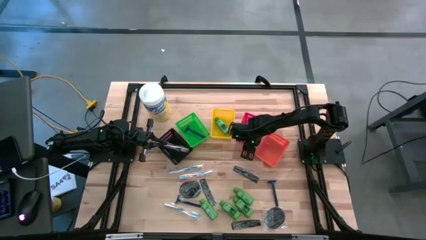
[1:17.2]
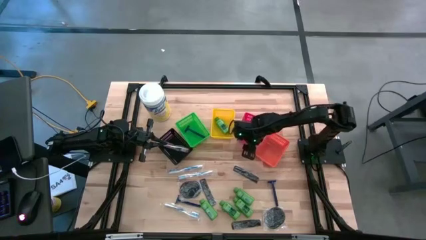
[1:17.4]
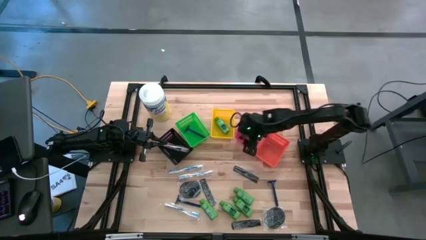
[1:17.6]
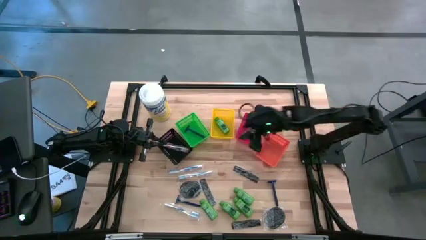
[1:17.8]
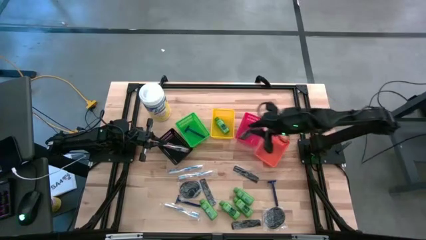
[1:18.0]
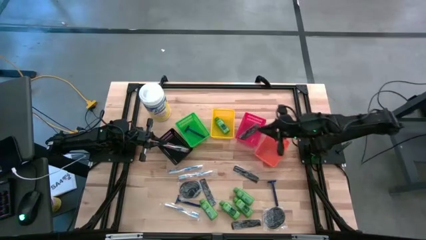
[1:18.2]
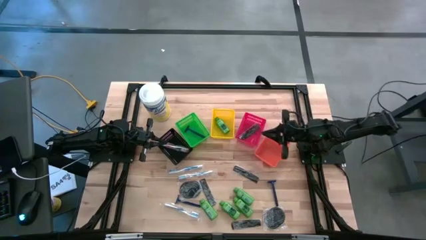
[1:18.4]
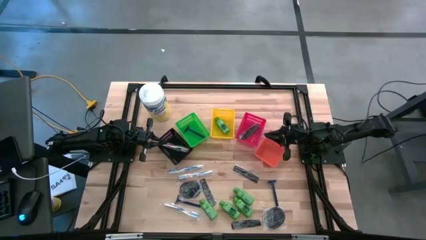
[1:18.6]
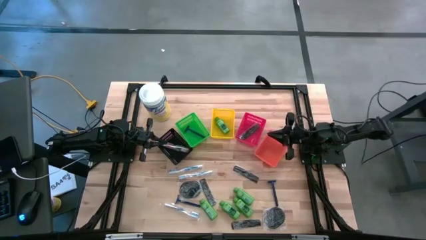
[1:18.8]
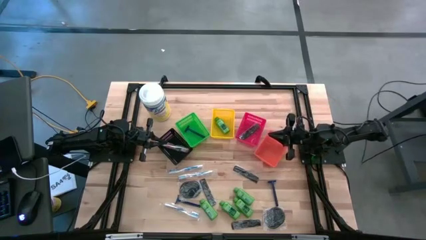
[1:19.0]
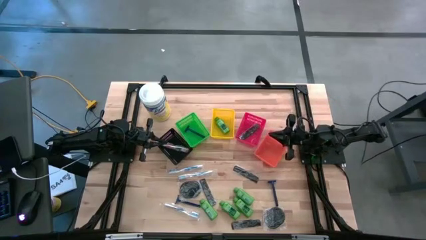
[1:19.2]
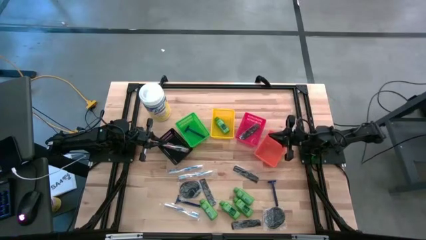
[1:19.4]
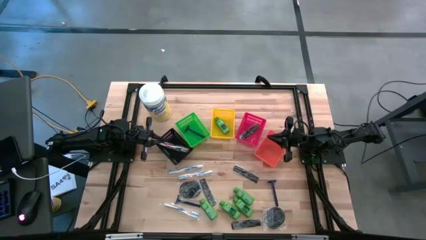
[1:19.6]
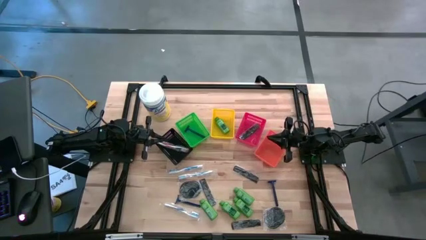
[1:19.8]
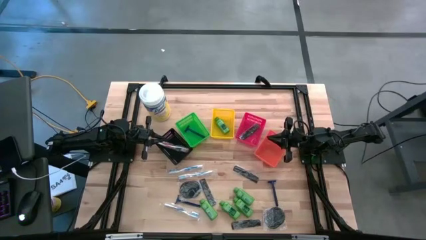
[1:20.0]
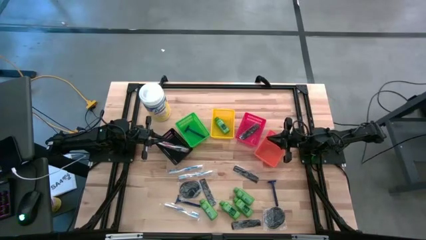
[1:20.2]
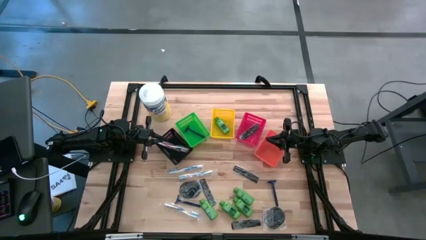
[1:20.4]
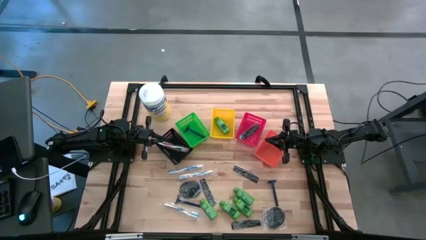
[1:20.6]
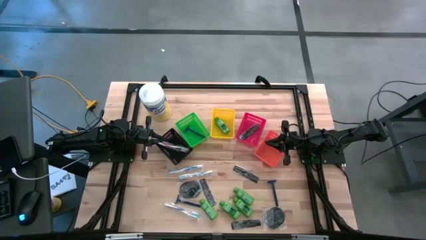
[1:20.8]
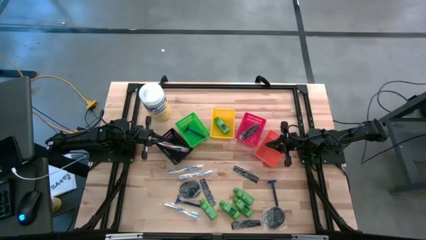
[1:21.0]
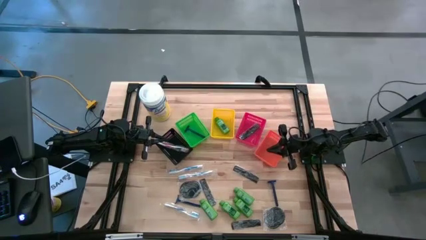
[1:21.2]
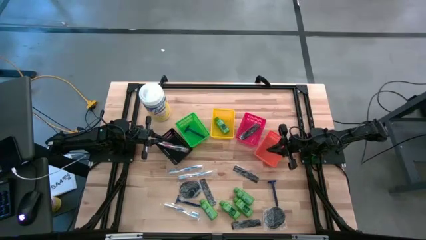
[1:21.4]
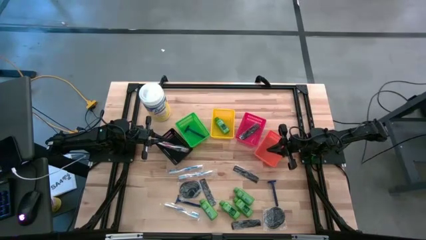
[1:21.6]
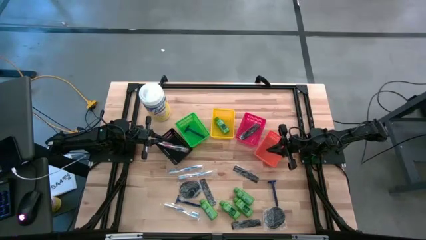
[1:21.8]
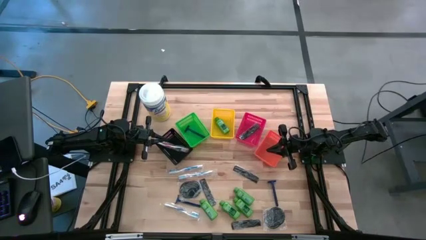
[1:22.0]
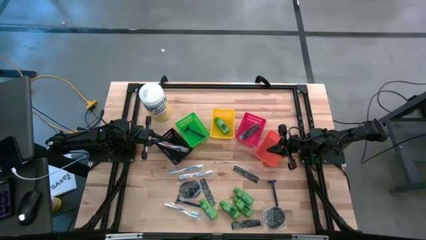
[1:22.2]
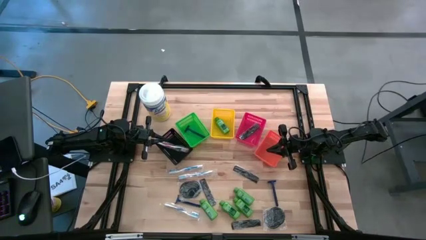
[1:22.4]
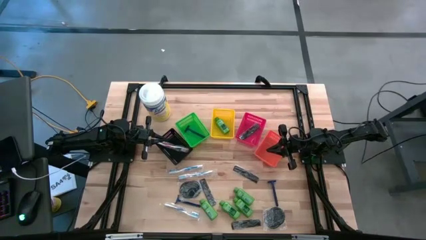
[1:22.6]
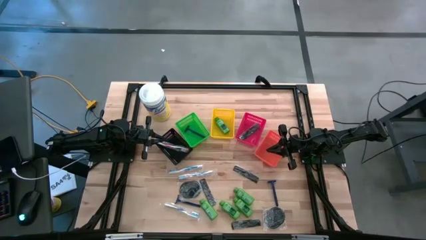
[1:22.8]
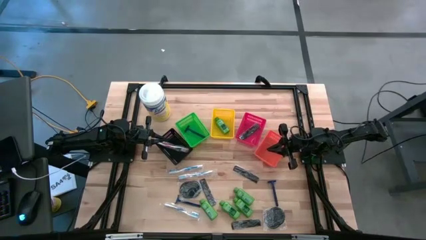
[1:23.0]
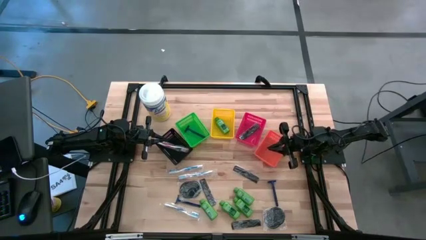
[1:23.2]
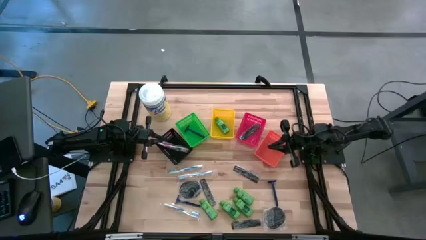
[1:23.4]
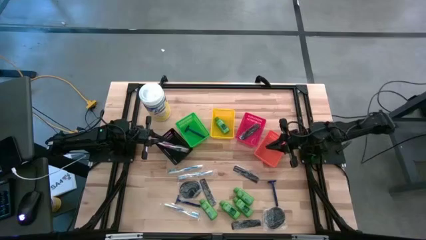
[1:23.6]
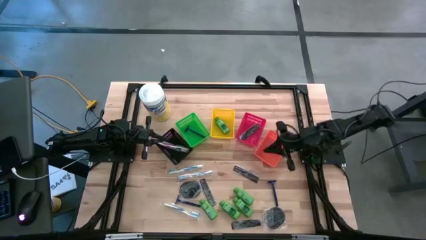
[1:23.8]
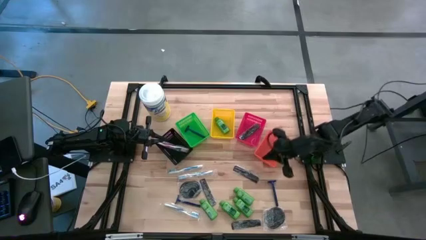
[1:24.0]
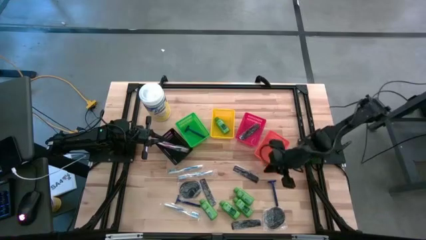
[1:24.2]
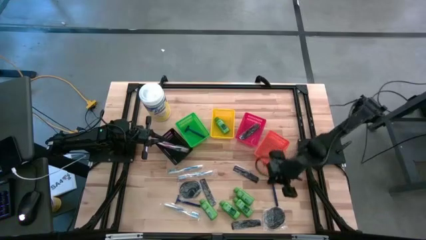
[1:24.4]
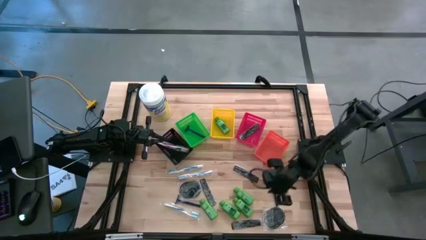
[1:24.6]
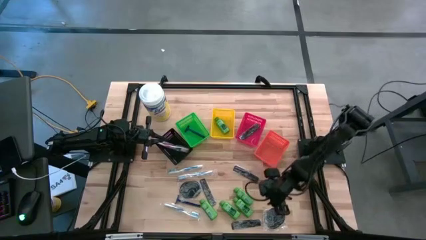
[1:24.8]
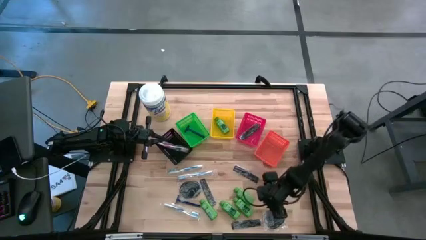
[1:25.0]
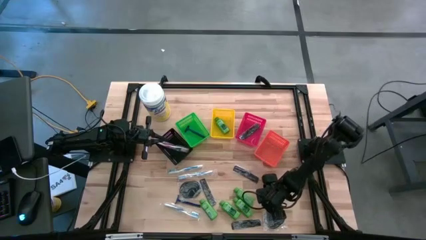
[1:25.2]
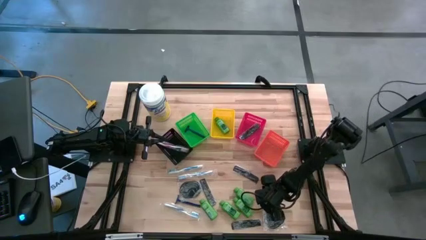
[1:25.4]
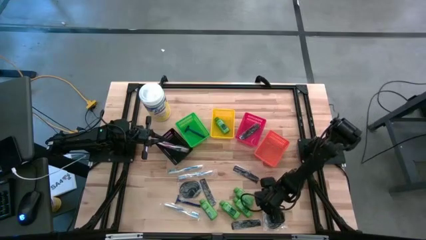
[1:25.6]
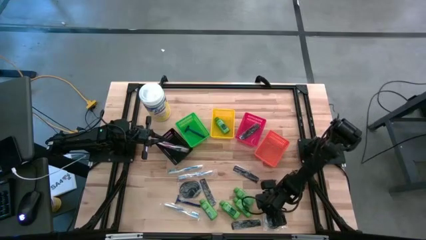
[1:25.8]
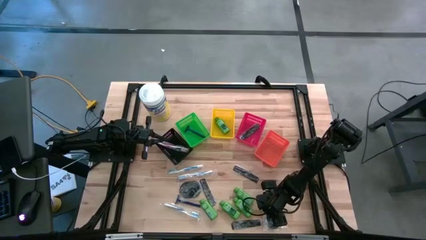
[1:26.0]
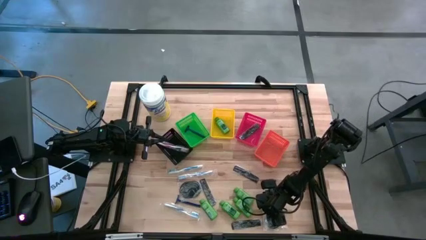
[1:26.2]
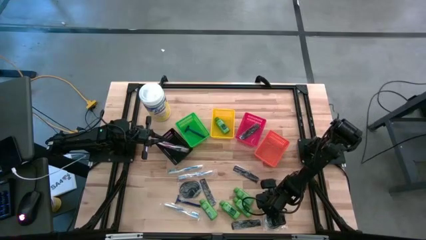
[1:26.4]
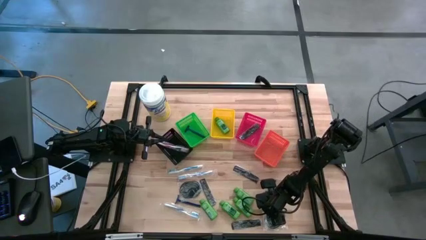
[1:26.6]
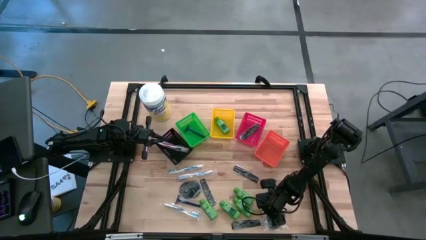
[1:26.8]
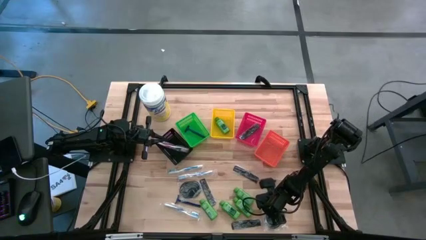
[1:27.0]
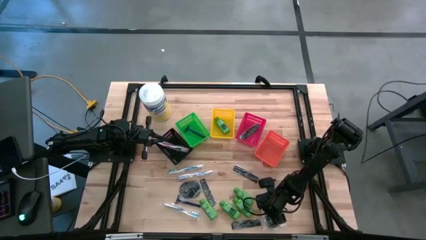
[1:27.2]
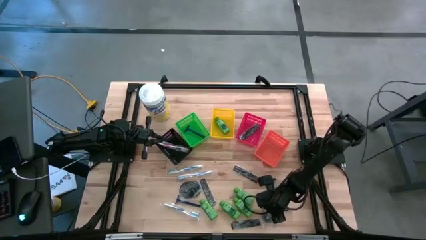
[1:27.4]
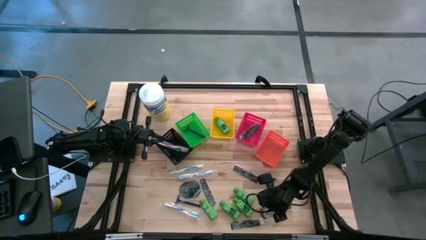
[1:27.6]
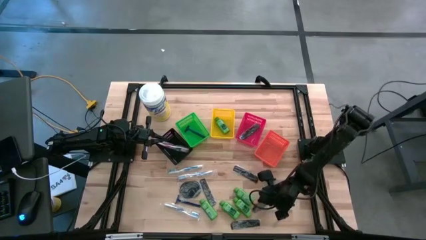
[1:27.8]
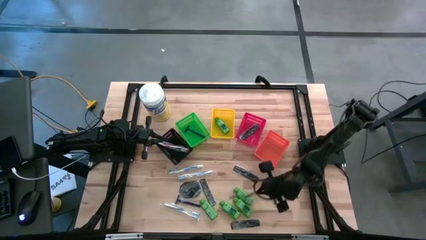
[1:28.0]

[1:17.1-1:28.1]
Task: Pick & Place Travel size toiletries
Put the right black hair brush into the orange bin

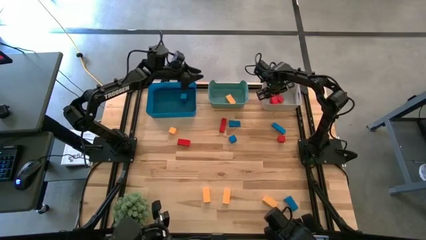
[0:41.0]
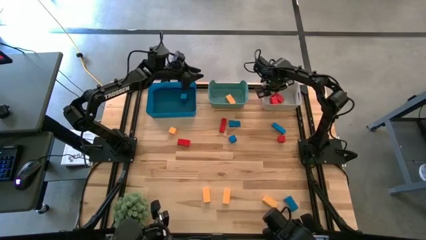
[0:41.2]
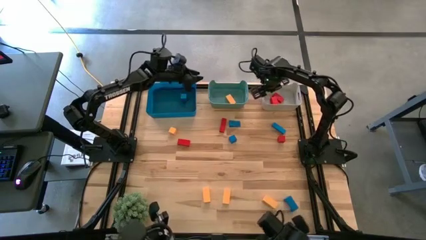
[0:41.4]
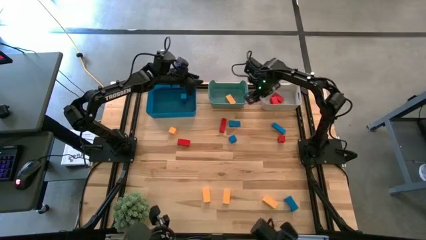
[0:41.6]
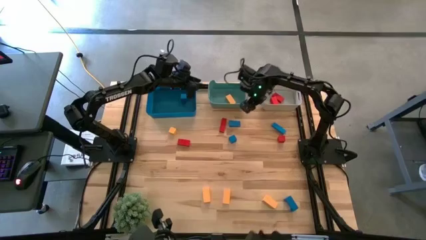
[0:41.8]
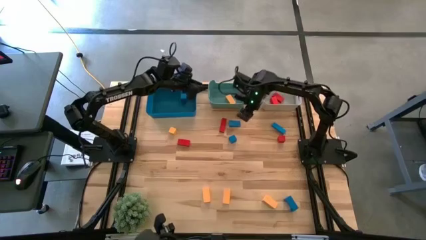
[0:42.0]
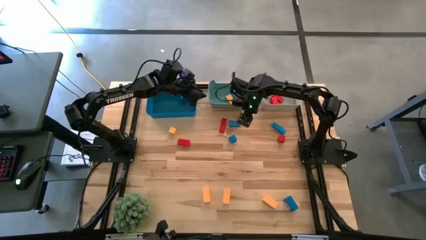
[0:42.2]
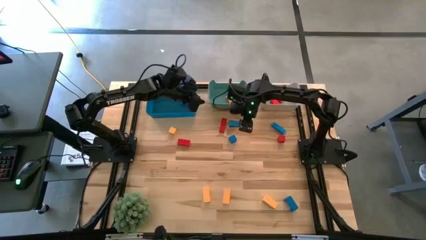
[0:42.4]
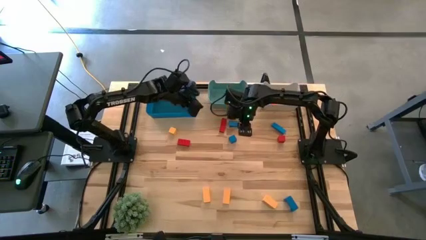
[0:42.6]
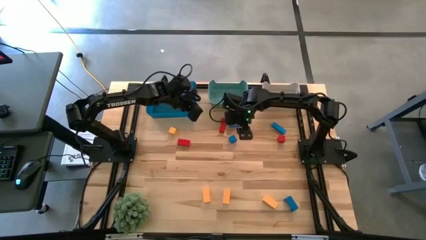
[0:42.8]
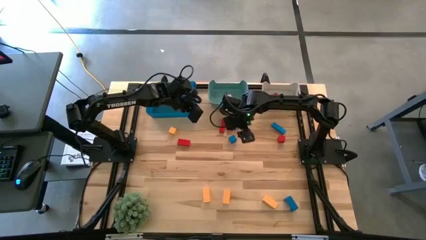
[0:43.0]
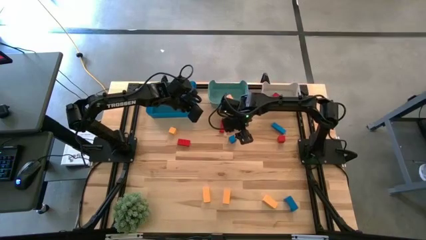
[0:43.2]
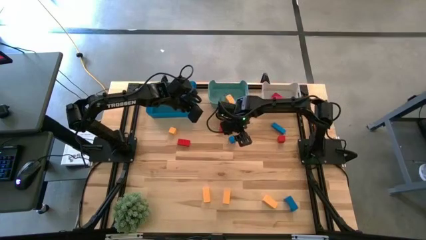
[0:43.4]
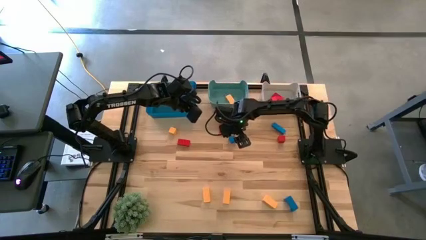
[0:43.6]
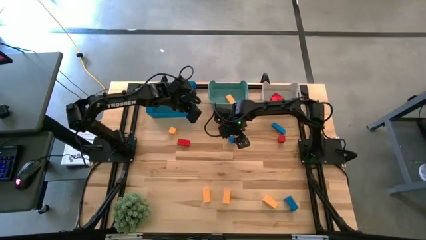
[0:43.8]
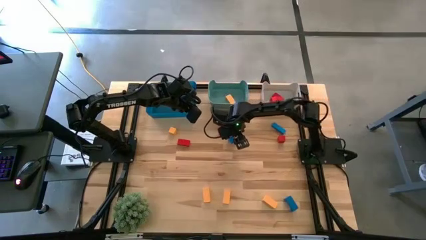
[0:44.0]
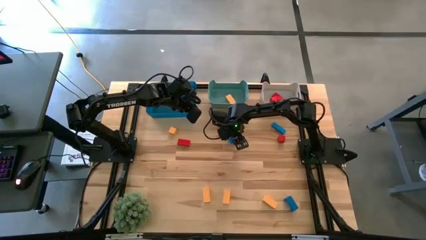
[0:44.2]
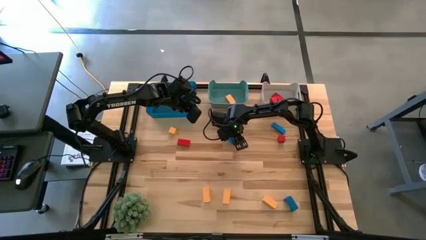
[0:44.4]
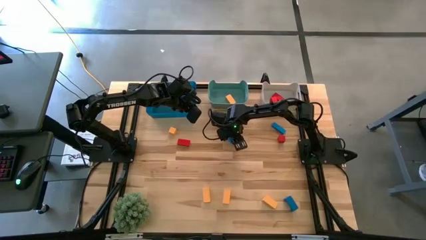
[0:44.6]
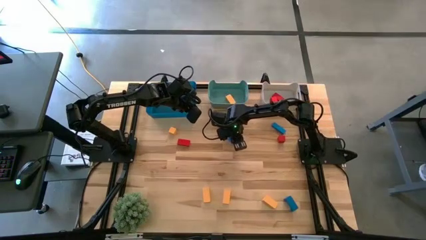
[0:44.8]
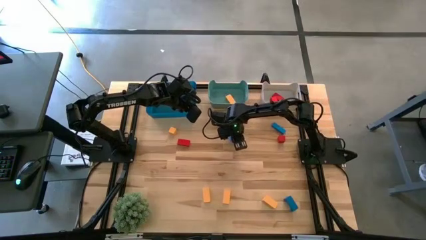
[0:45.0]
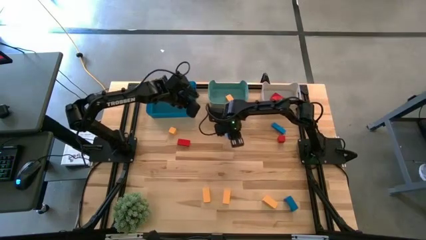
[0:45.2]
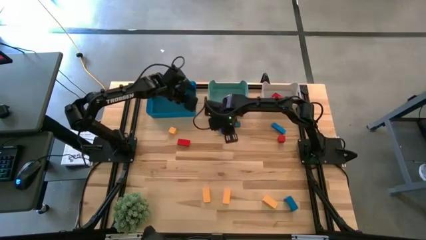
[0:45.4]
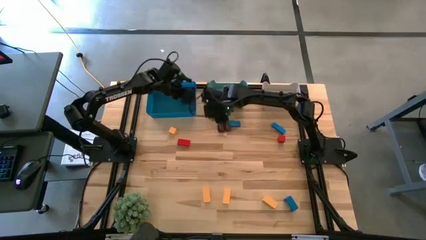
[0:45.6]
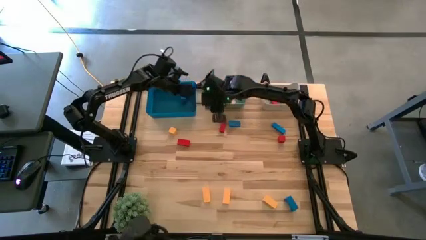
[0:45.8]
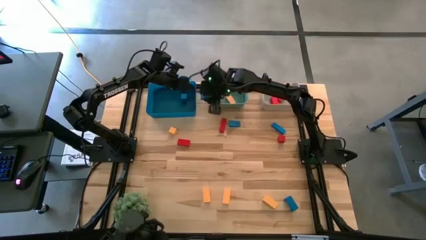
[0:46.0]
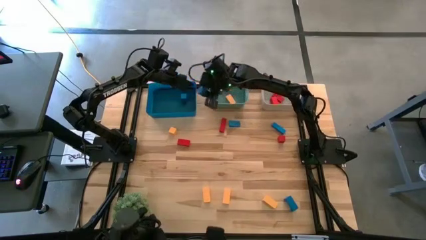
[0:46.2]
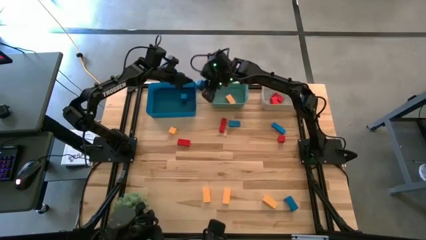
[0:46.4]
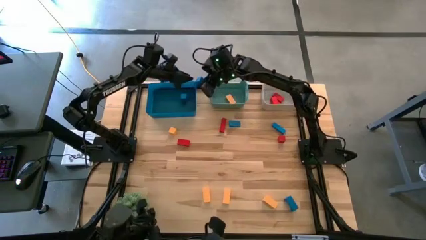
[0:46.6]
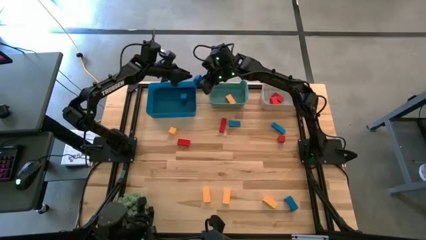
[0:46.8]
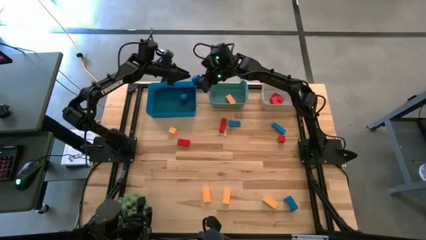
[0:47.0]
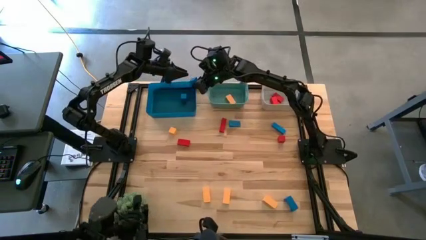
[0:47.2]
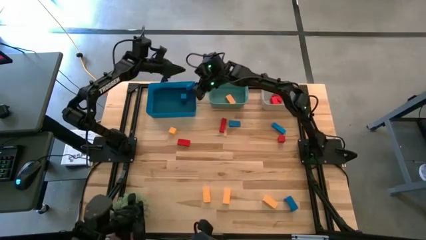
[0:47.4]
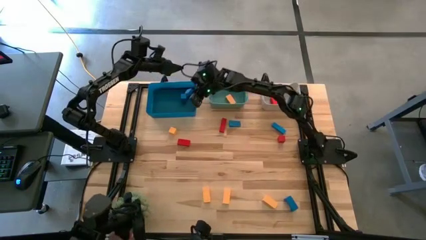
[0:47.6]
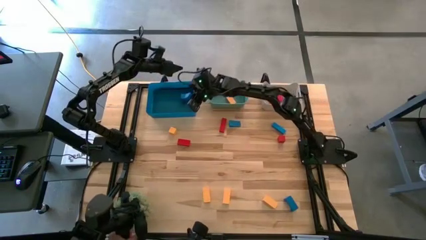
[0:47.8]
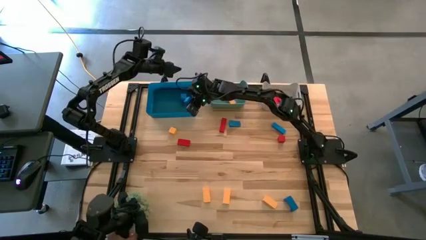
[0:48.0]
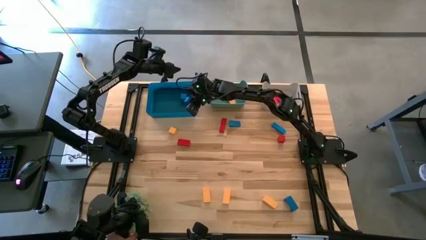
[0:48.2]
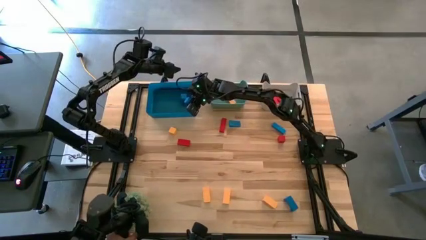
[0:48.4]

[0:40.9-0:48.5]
Task: Sort & place blocks by color
Put the blue block into the blue bin
